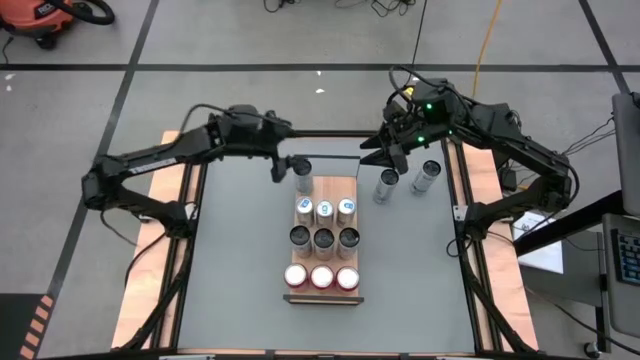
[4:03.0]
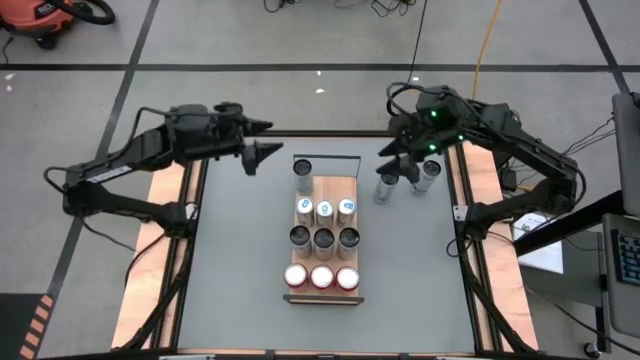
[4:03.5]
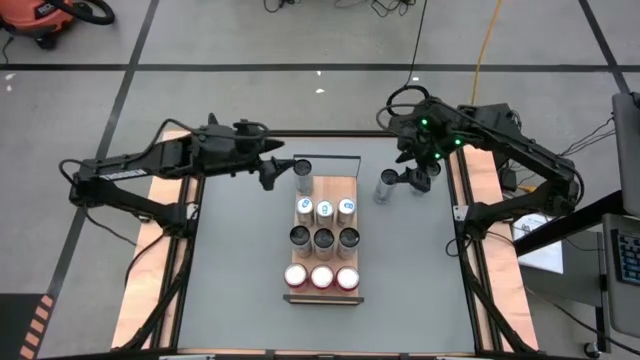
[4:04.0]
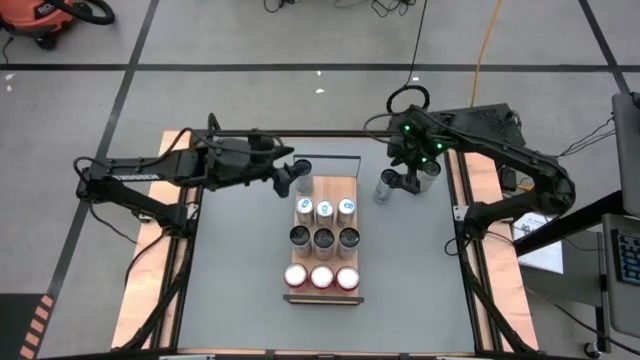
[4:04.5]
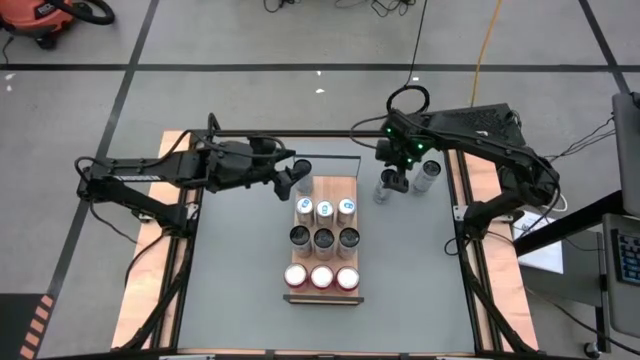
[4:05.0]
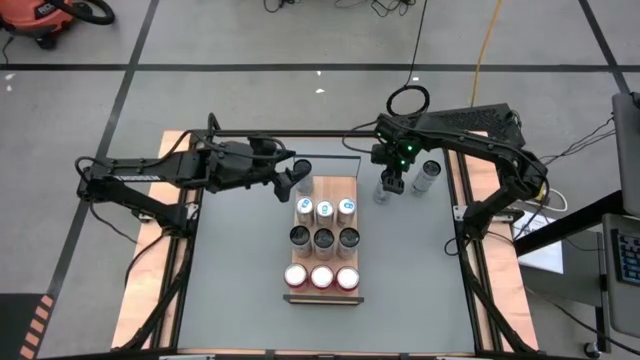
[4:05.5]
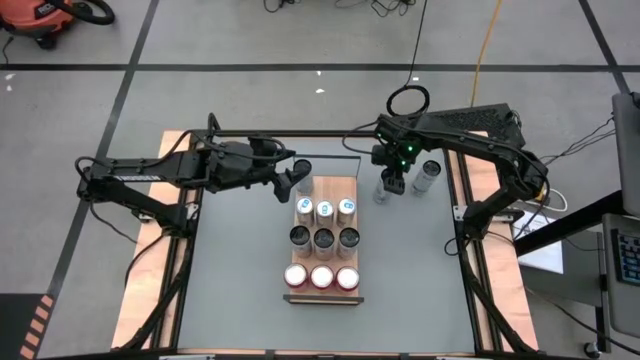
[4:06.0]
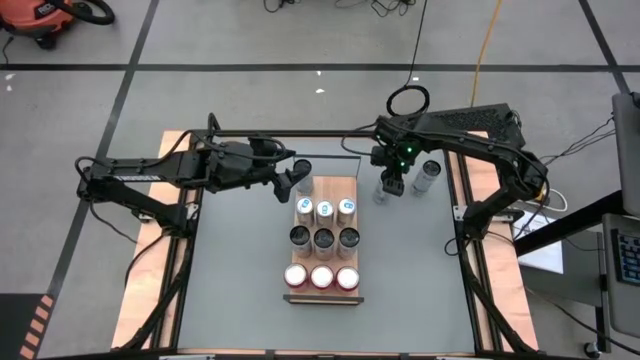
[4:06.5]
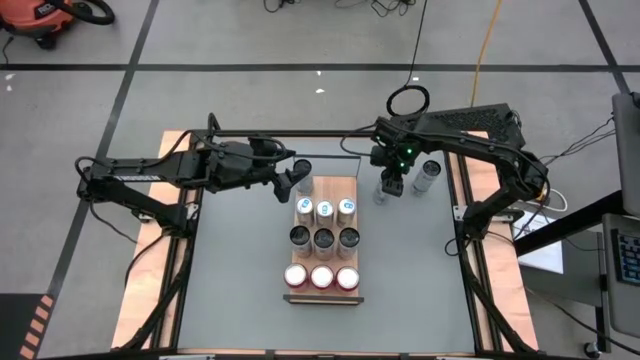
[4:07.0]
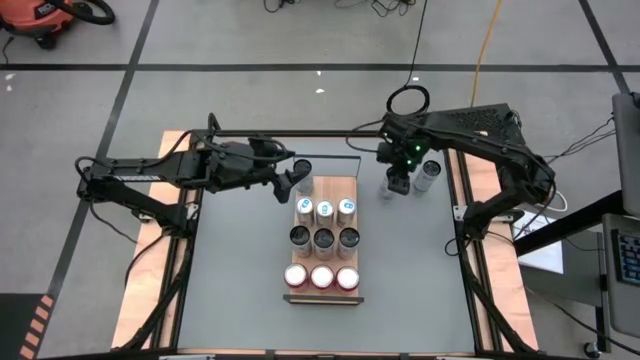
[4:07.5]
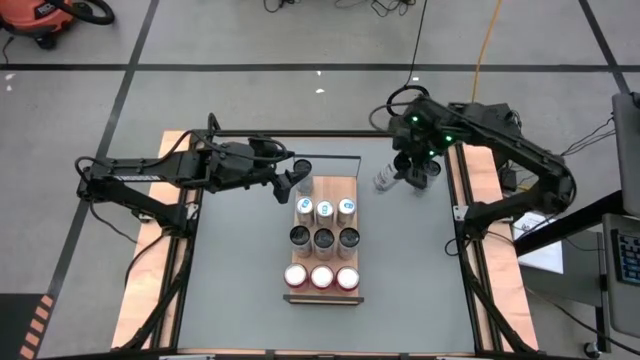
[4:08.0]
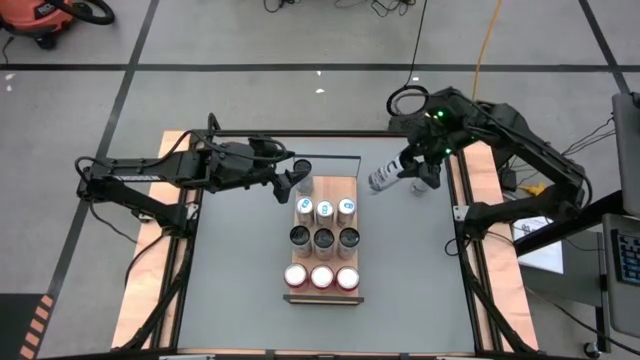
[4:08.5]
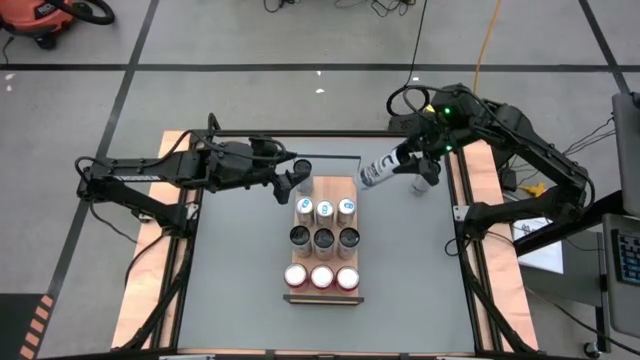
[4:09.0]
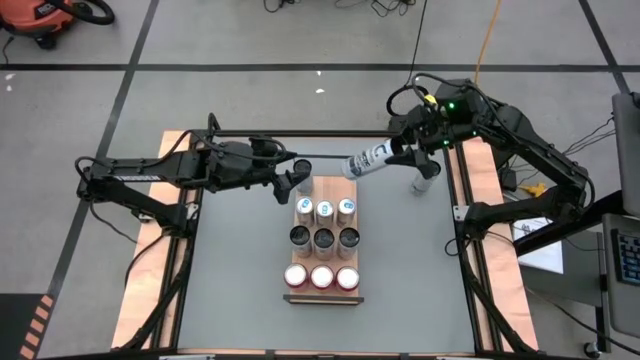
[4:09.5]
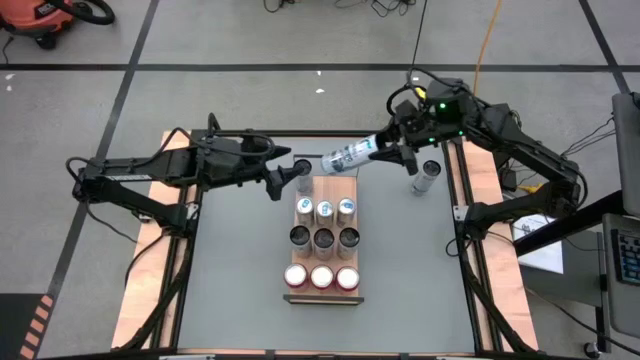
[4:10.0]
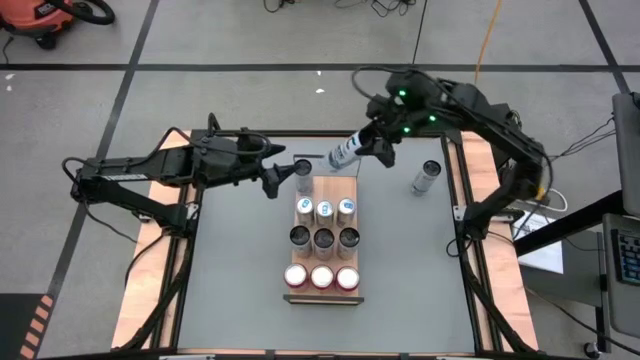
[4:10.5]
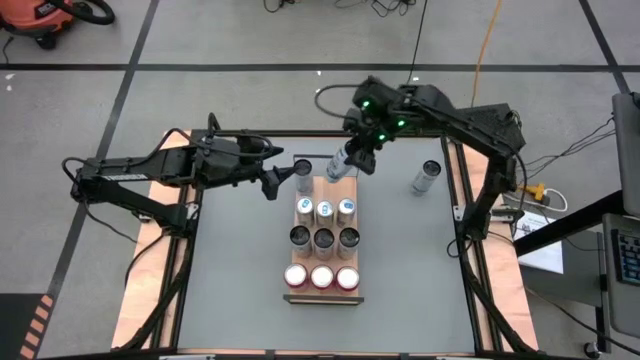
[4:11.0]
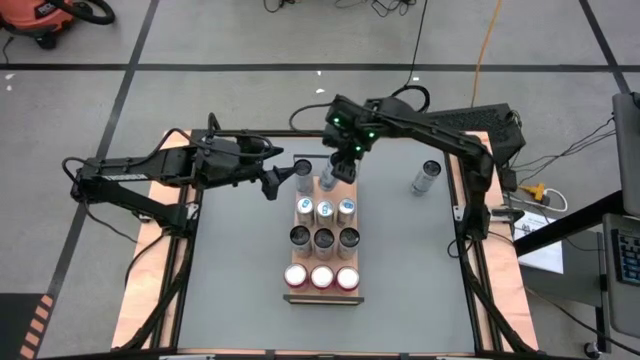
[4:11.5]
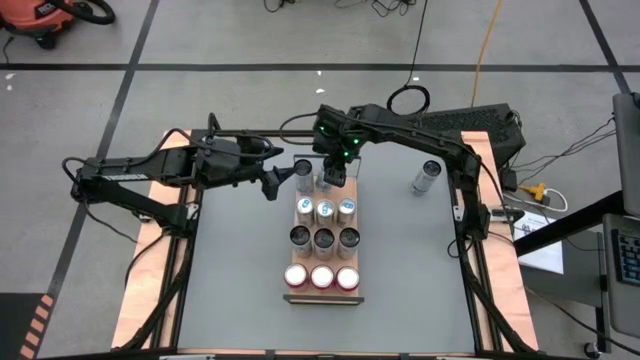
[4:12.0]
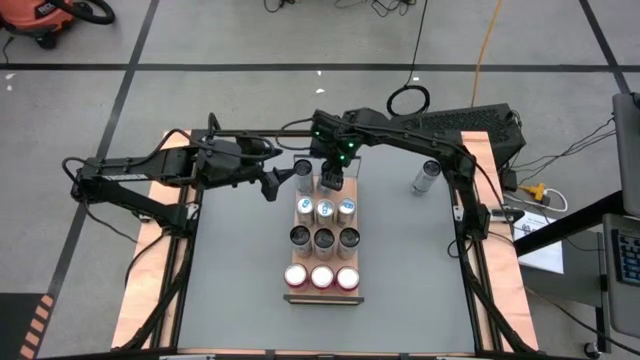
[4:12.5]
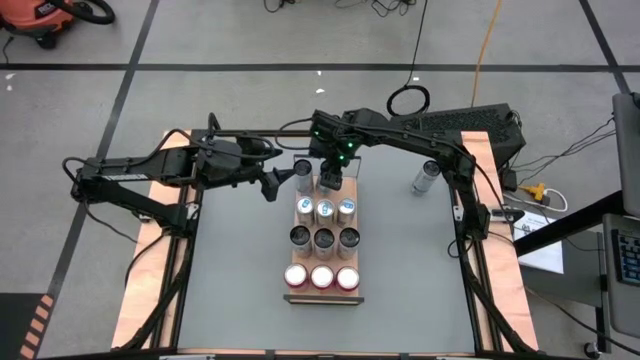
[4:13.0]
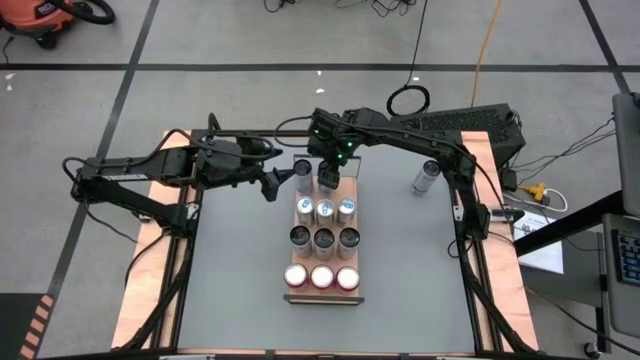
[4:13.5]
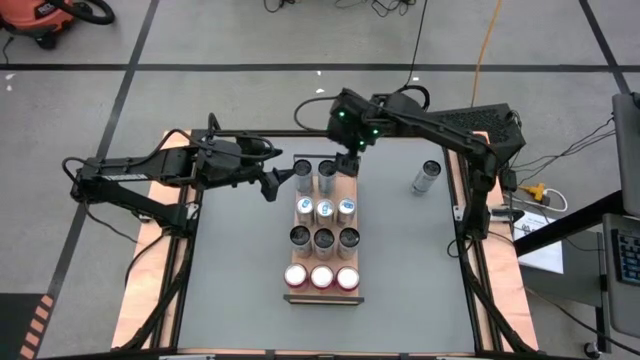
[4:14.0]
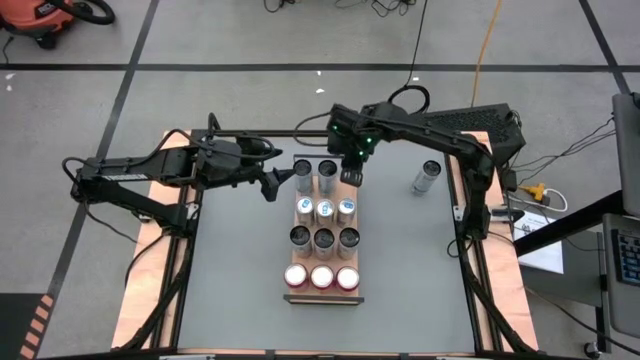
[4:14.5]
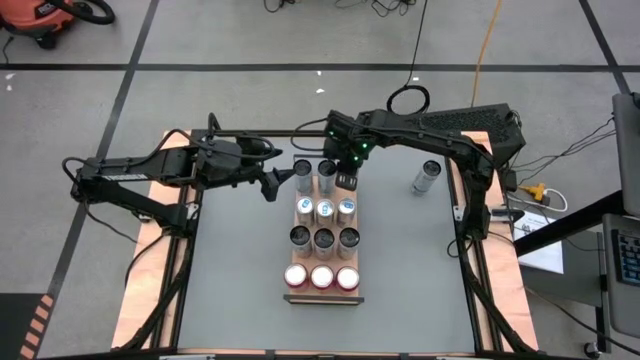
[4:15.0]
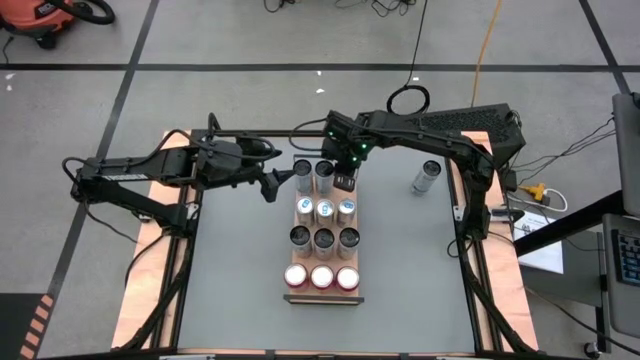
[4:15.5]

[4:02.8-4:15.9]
Task: Sort soda cans
Put the left white blue soda can on the shelf and align it with the other white blue soda can
